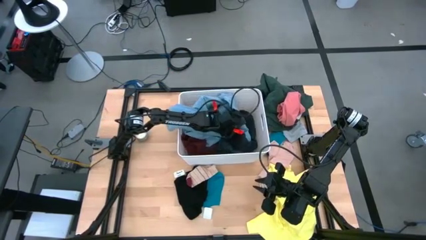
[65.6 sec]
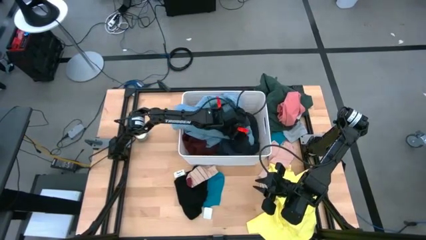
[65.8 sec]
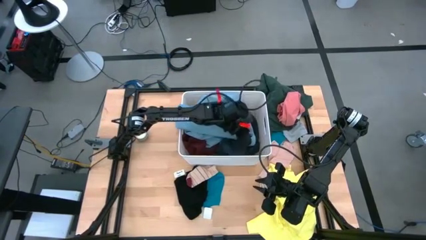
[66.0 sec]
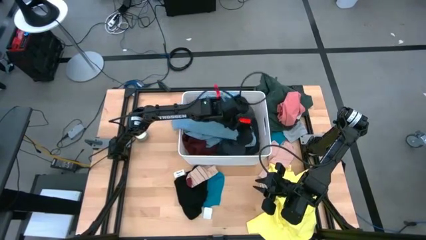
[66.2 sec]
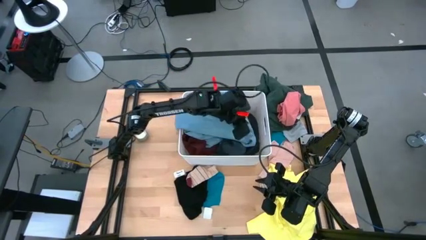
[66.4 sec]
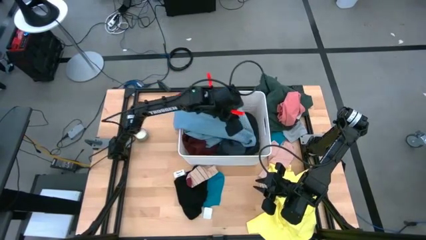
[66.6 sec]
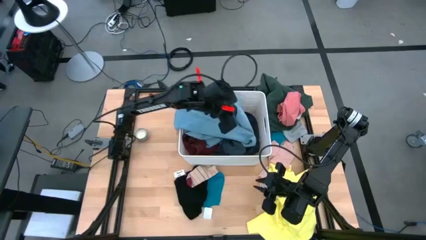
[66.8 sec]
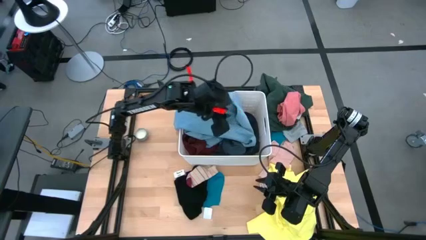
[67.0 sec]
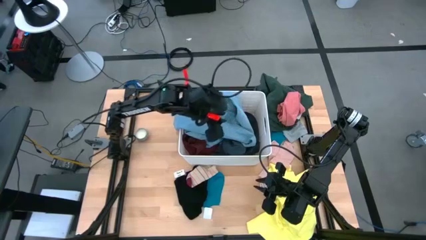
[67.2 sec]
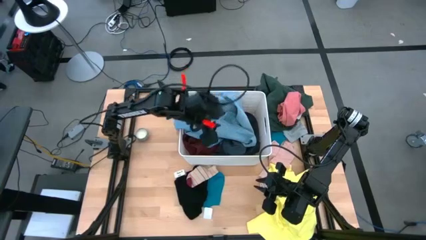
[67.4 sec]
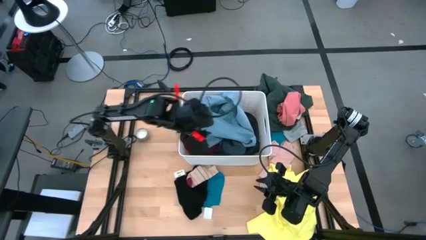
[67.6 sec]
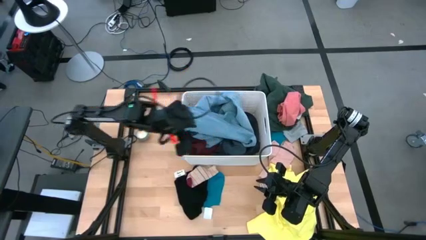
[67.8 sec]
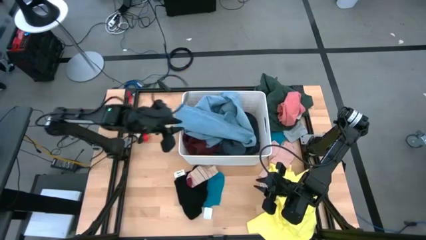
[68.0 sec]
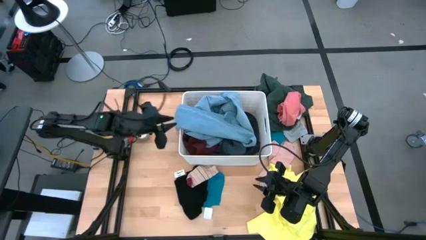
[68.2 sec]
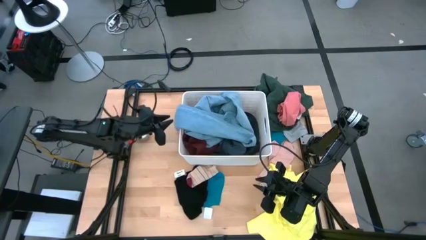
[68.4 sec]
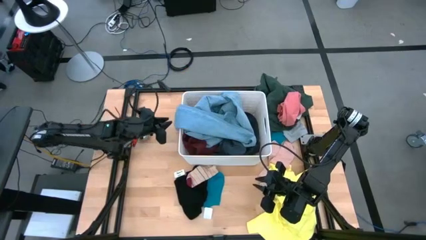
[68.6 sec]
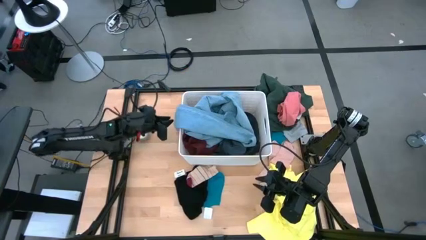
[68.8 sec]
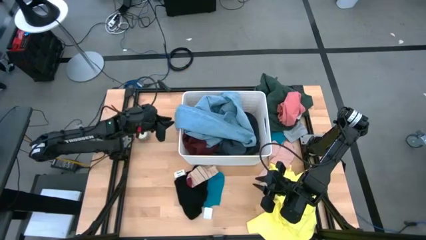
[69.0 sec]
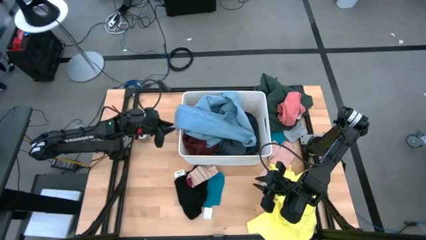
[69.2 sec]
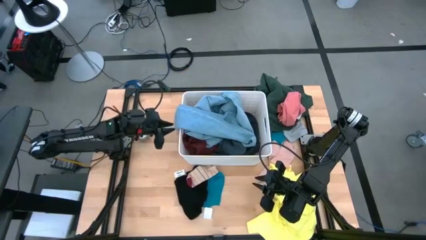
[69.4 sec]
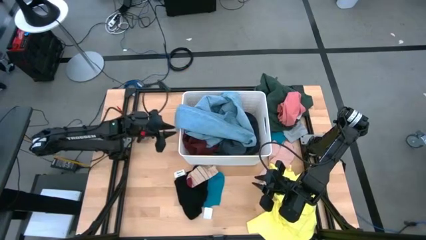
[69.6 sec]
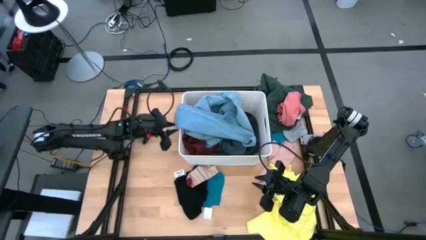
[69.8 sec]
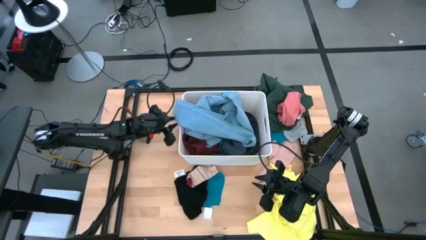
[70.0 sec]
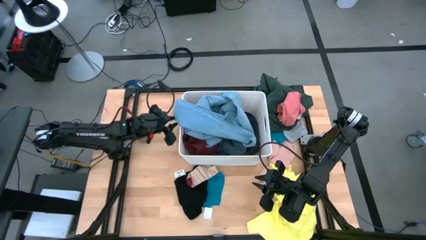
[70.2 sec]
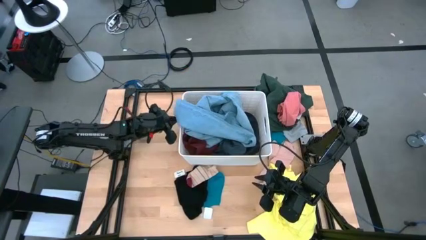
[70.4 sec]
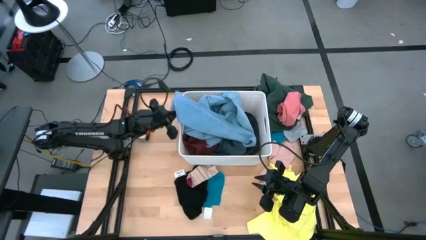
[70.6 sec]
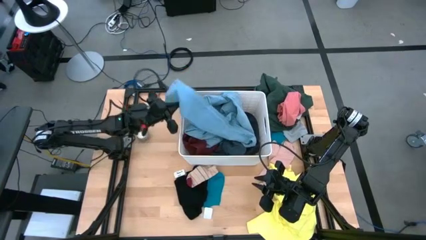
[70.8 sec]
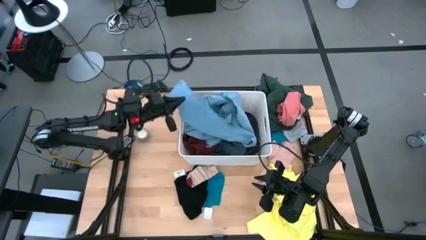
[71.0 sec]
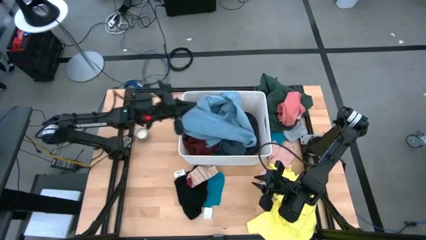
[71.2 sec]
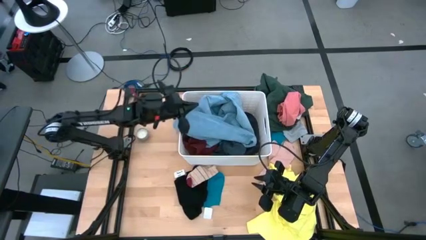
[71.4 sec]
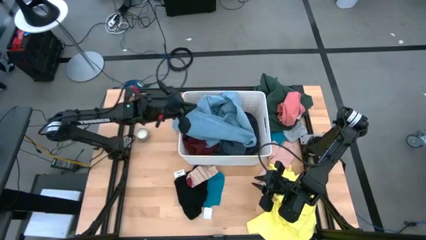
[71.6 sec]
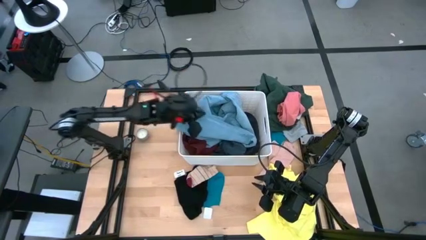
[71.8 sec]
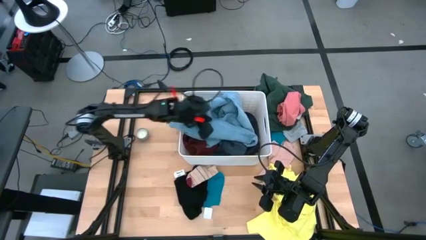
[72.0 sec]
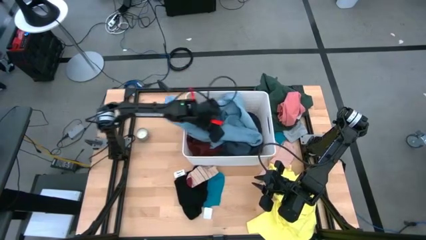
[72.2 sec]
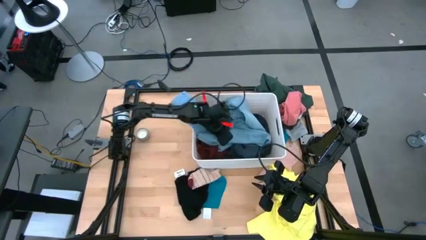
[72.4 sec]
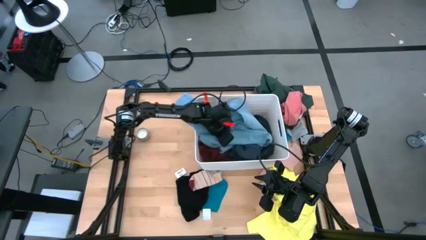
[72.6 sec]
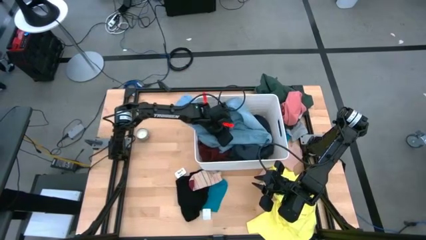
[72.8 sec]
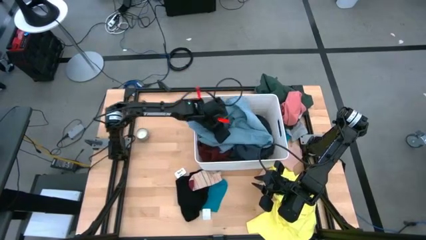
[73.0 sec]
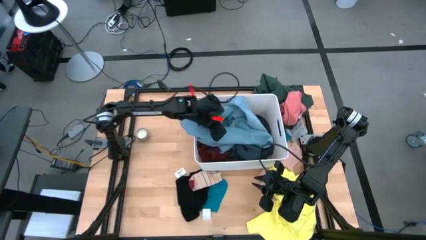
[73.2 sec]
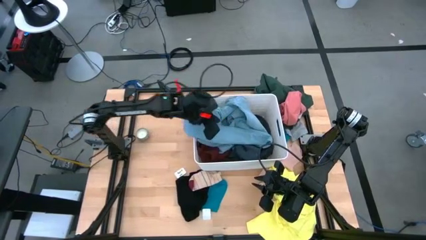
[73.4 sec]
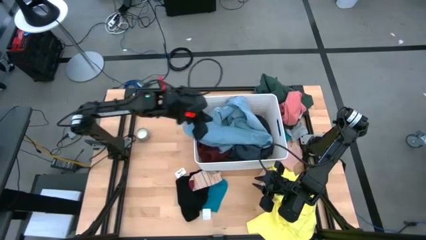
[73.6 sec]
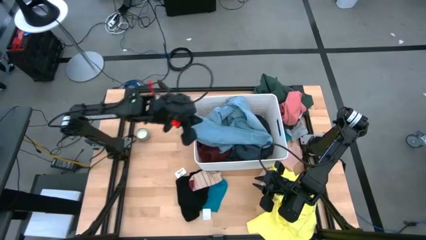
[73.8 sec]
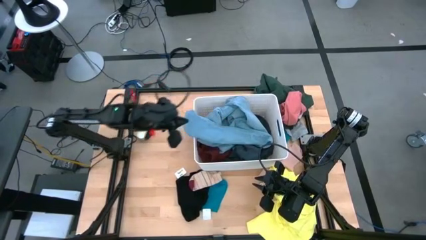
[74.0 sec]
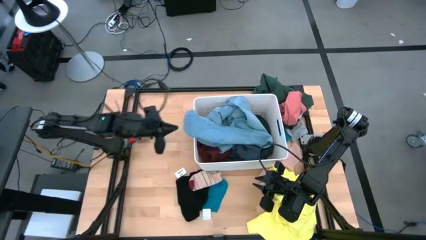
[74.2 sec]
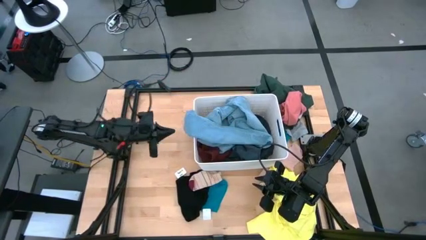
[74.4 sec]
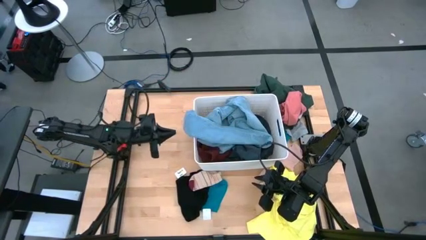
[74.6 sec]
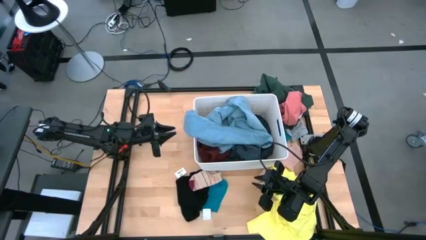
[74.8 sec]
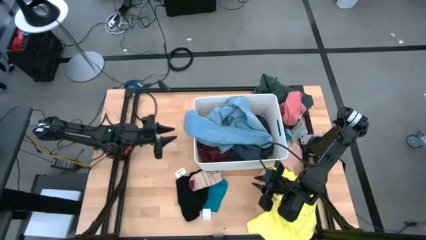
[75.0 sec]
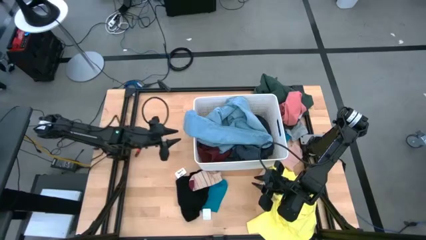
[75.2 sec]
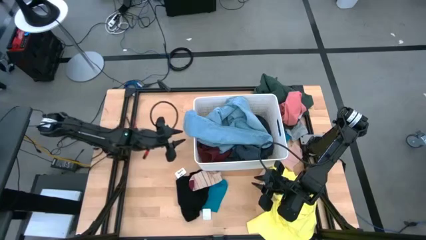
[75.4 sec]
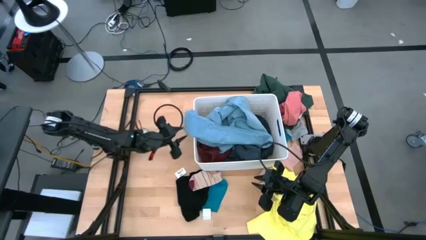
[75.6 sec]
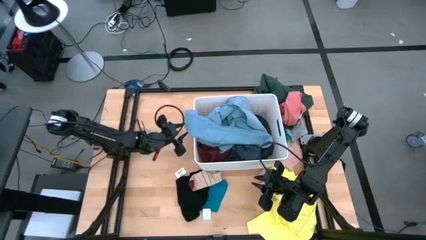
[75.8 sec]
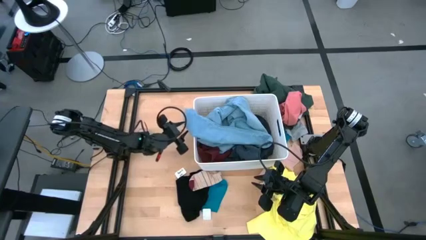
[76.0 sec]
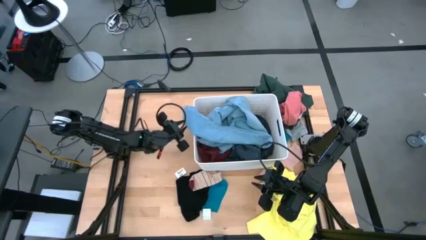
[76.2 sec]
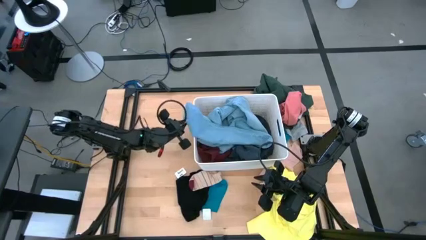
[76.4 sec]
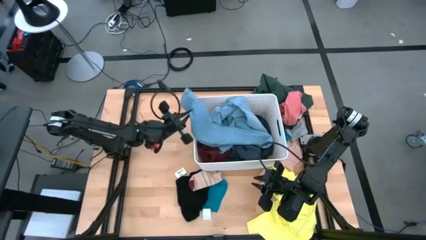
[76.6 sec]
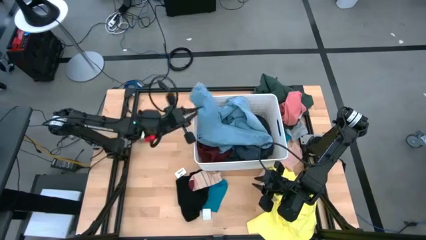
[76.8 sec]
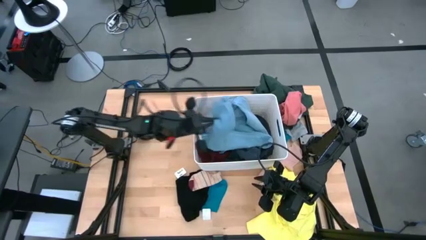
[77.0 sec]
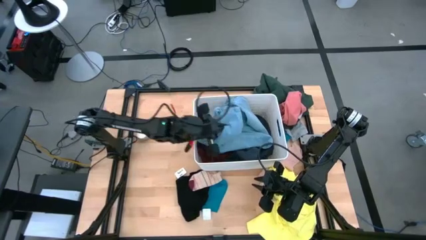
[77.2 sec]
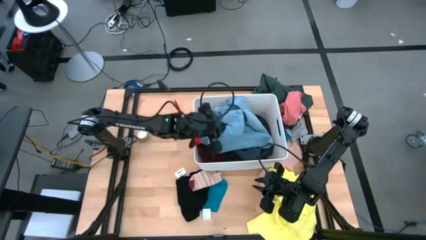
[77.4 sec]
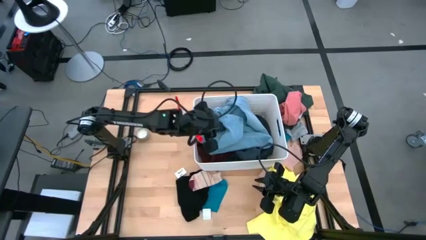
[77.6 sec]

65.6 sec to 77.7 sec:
Task: Sort clothes
Put the blue pants into the laundry bin

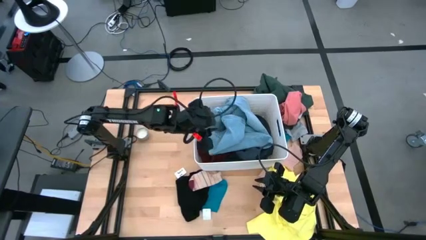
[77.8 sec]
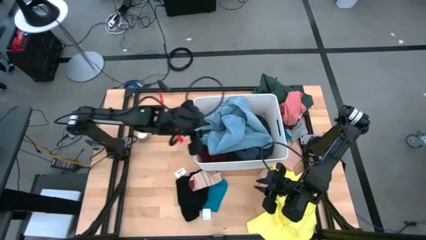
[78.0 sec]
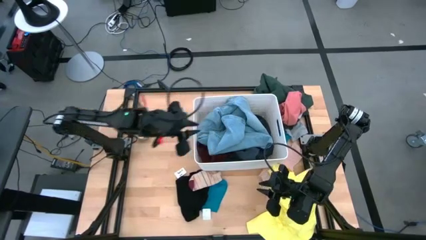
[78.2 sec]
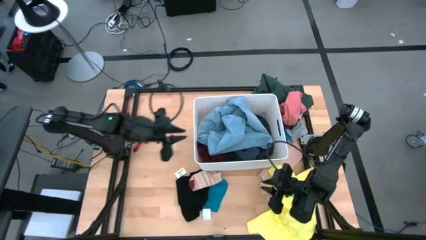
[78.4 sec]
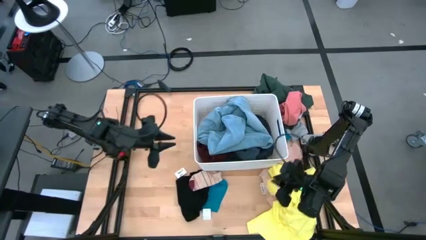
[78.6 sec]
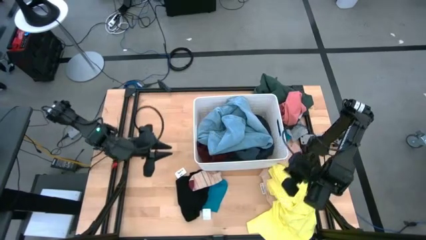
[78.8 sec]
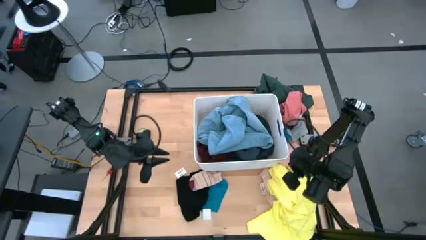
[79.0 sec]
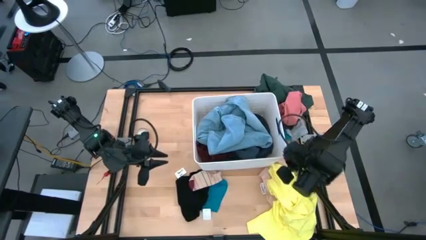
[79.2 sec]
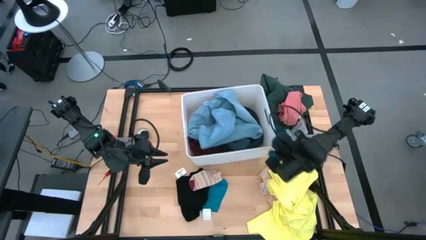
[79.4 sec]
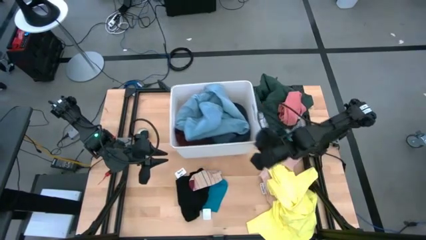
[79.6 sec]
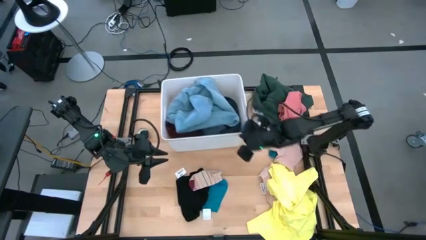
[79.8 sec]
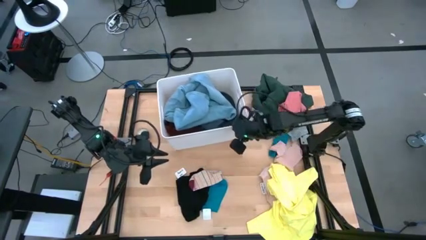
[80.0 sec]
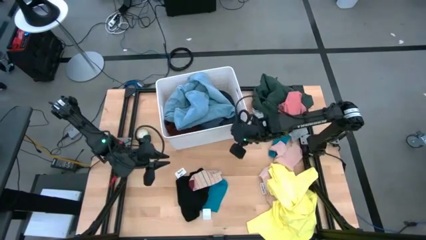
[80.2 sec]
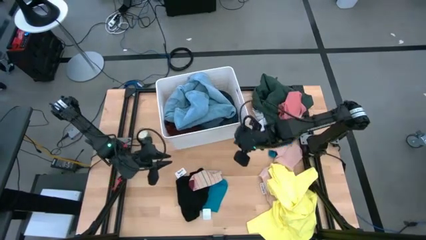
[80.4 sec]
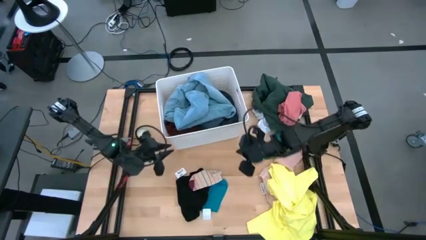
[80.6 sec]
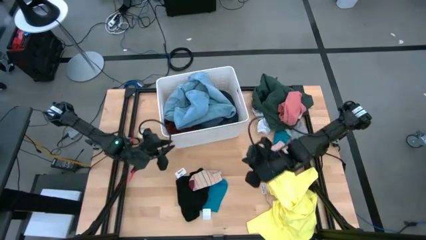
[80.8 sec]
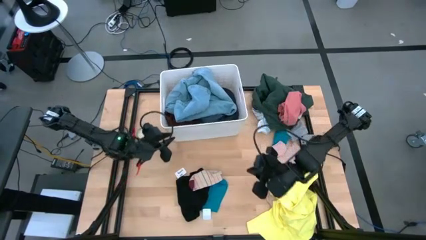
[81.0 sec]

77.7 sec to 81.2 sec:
Move the laundry bin to the top of the table
